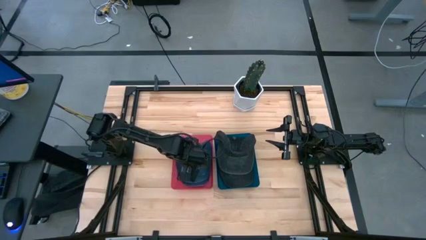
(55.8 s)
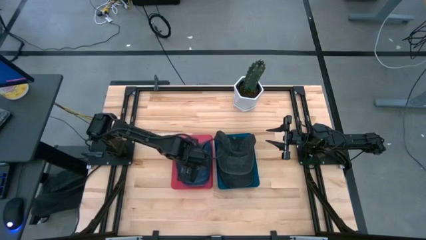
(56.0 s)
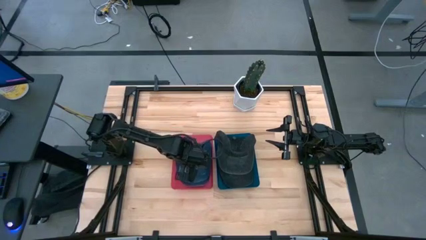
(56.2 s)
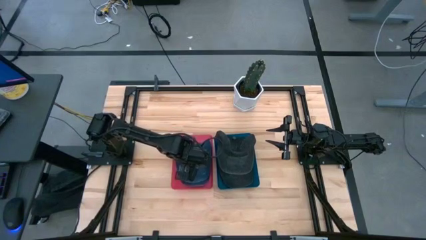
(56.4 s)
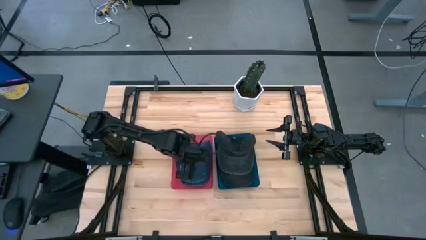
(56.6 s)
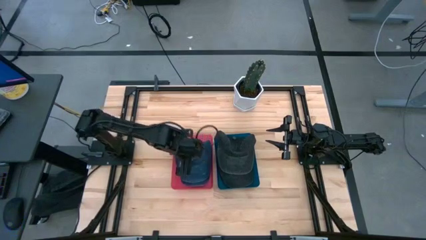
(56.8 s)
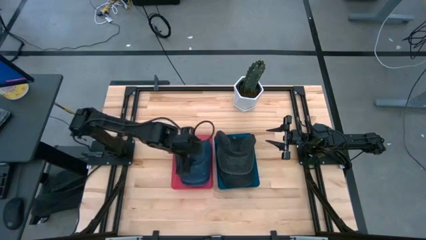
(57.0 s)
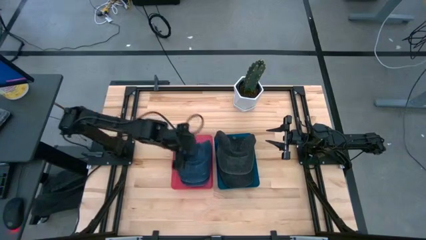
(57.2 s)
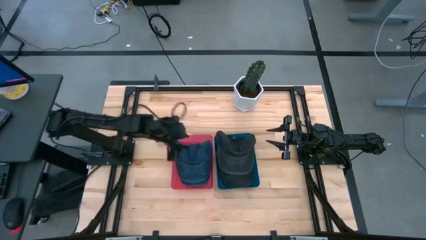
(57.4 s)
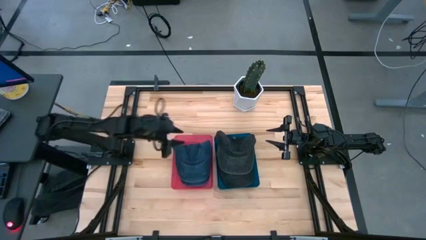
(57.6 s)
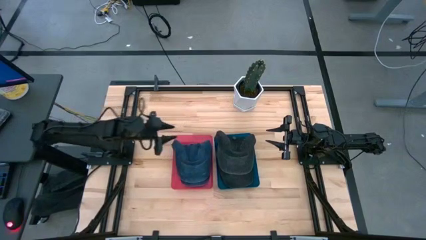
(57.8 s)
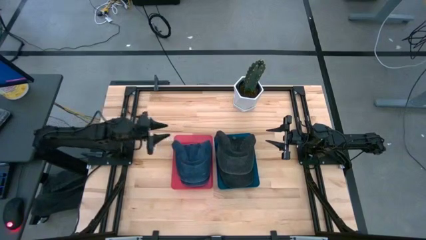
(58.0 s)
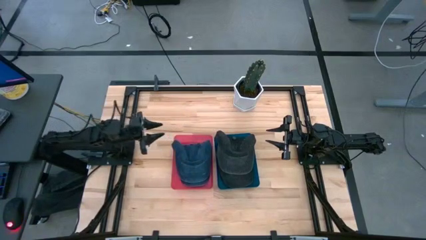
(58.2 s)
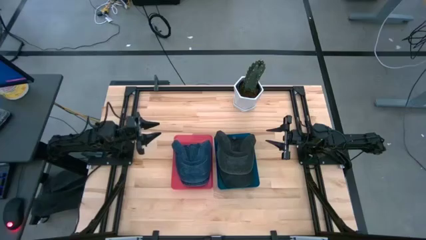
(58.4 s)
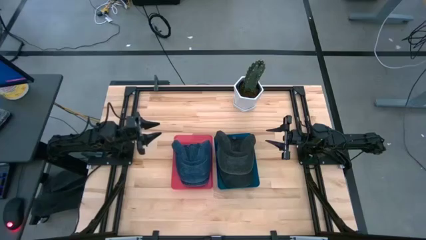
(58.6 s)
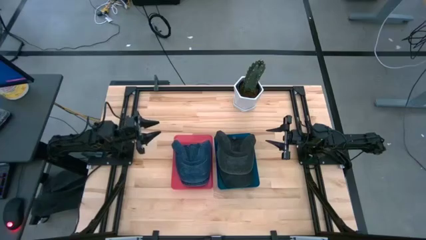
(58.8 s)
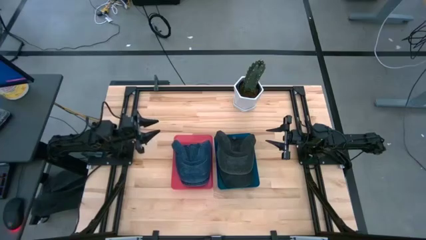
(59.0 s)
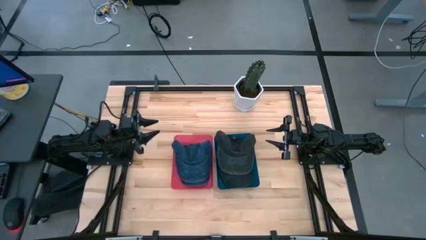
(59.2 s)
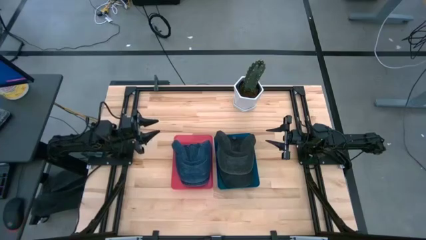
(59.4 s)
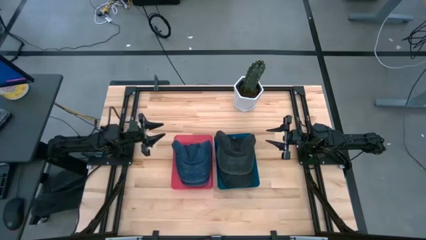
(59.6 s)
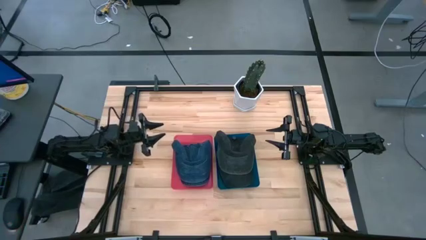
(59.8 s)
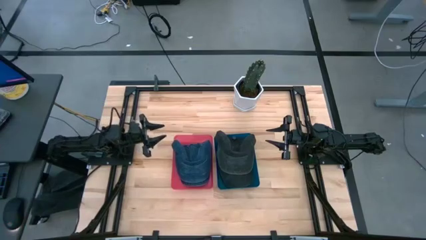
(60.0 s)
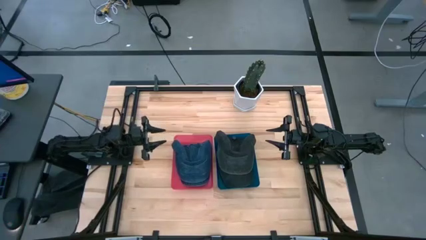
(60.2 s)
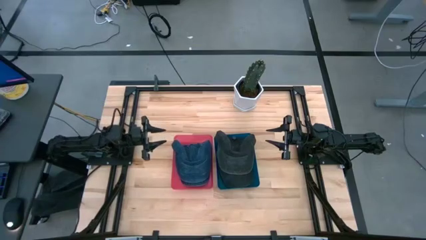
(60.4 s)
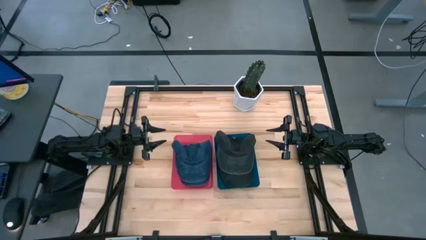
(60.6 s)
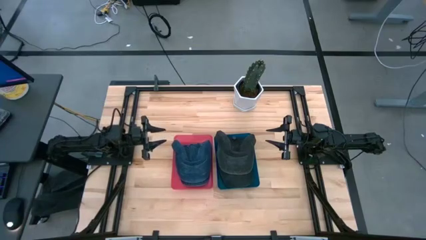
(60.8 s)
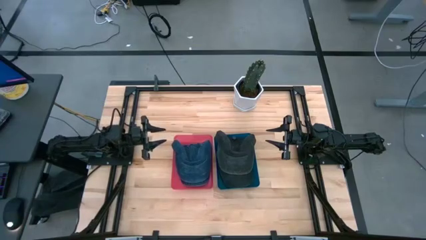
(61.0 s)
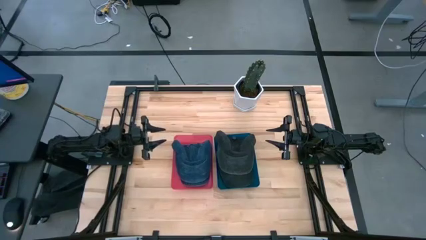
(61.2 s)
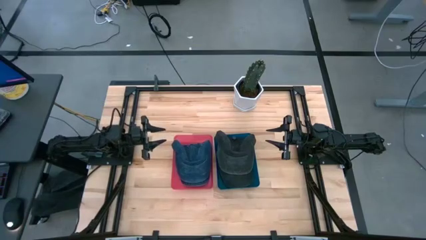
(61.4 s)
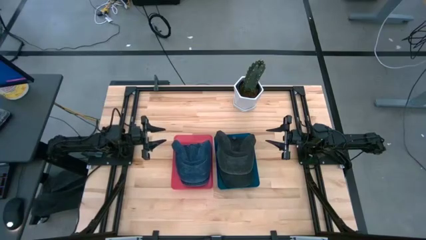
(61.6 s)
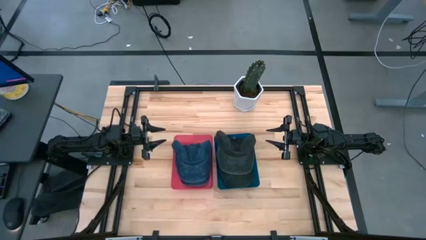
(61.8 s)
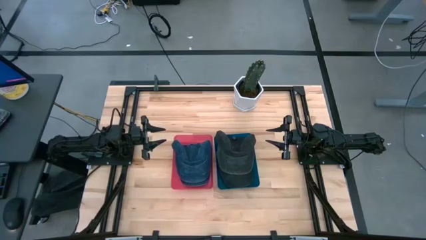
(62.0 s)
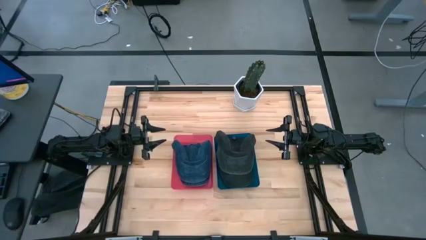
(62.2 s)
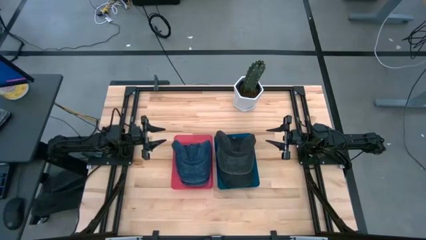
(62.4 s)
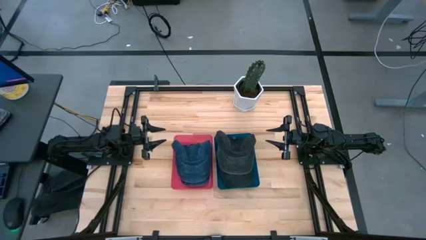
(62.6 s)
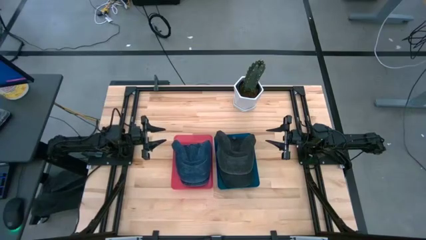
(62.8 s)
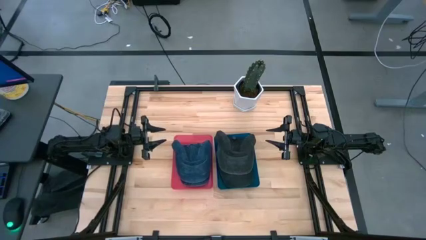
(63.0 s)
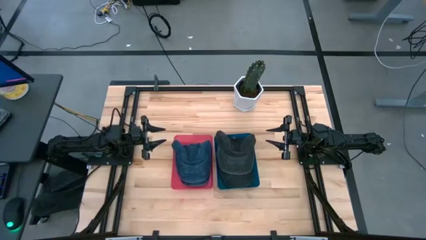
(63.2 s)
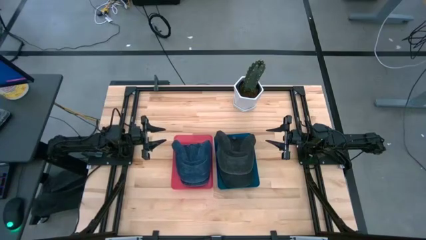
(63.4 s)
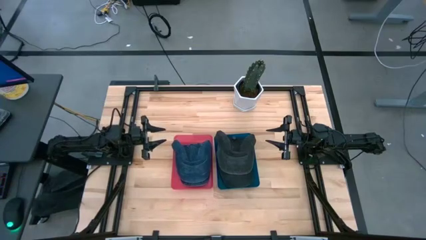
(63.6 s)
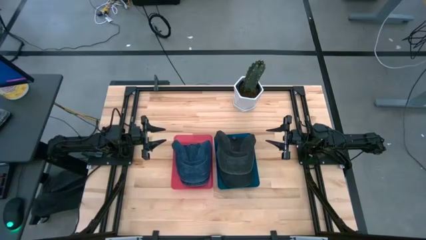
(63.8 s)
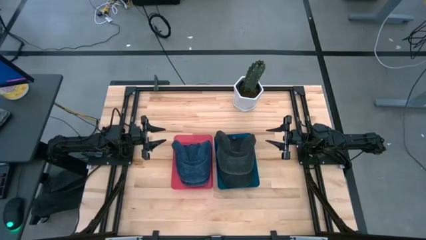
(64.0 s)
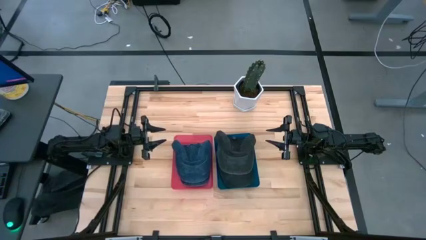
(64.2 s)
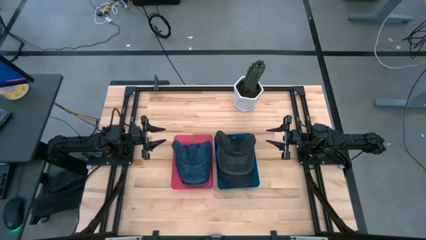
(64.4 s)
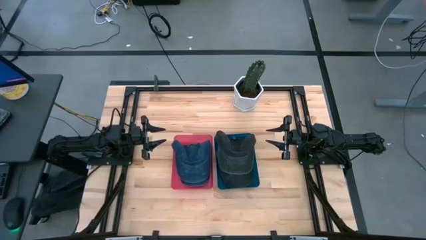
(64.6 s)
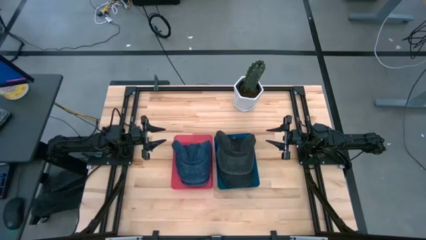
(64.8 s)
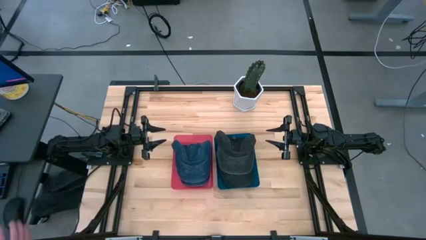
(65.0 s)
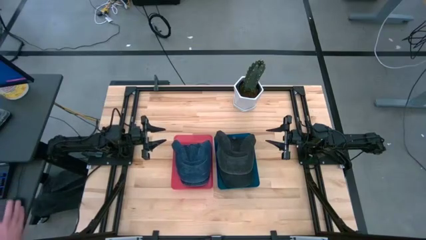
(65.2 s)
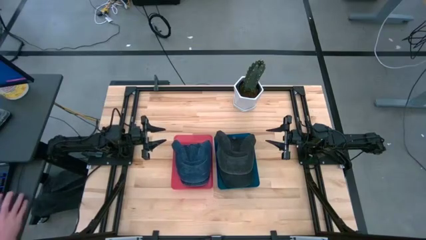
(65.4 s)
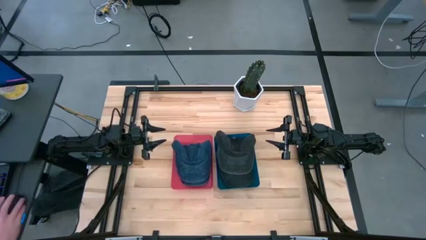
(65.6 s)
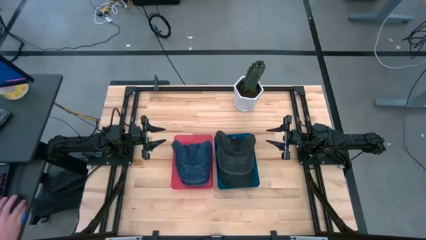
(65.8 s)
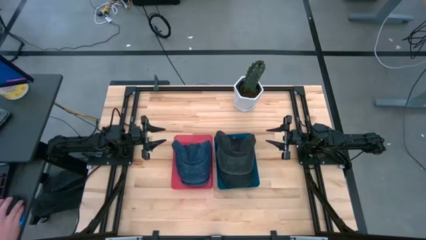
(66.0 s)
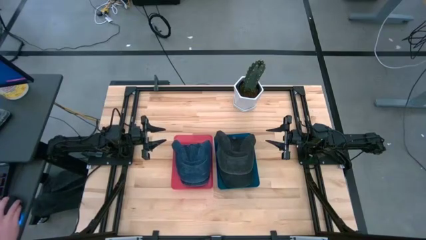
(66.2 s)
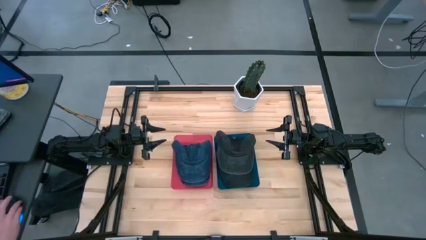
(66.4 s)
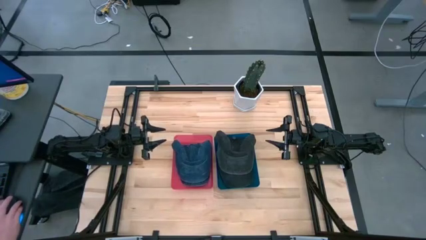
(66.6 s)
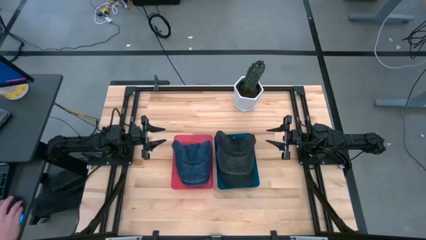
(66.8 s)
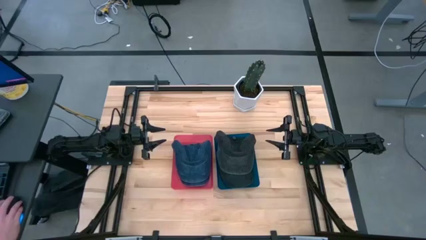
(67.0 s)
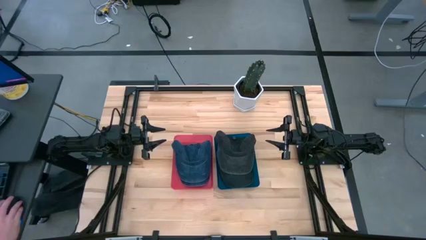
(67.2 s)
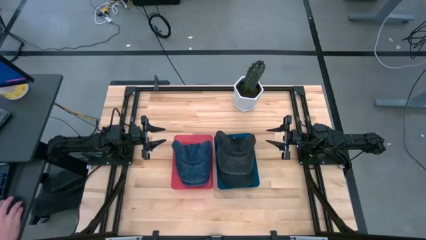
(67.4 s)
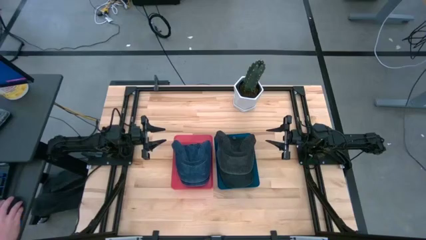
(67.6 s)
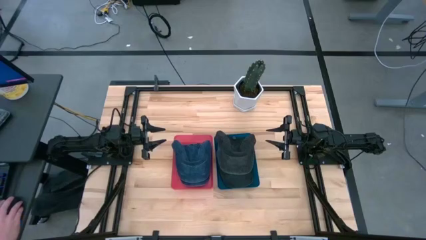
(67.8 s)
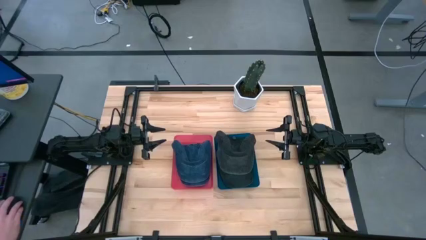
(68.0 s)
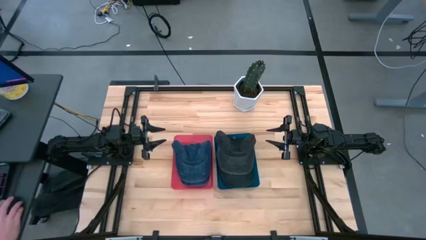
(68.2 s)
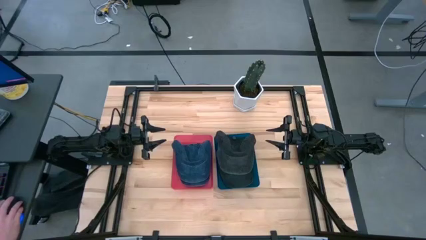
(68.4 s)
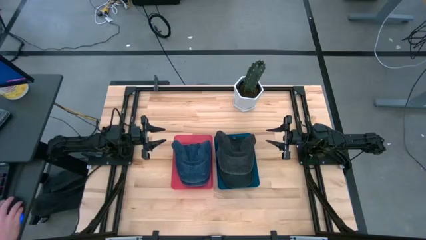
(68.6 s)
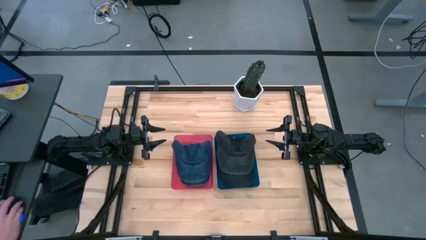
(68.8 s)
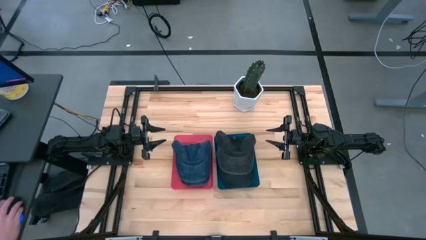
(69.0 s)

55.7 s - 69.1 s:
Task: Pick & Place hat
Return to Home Position

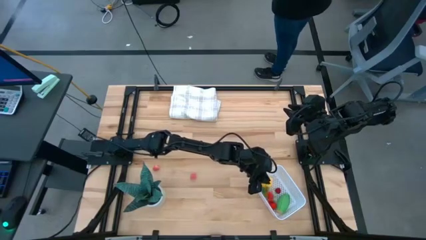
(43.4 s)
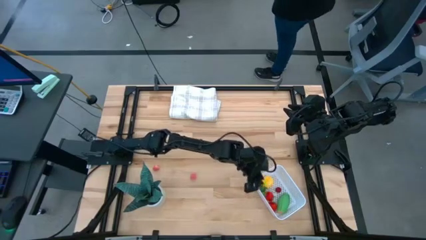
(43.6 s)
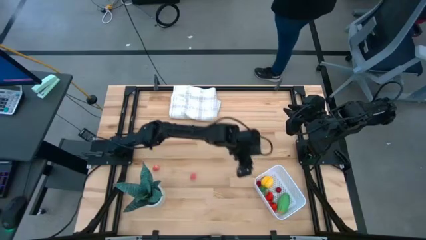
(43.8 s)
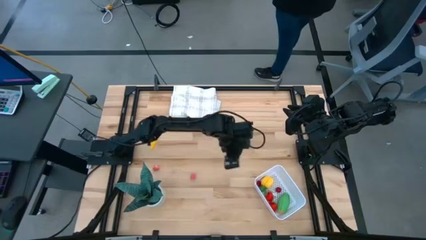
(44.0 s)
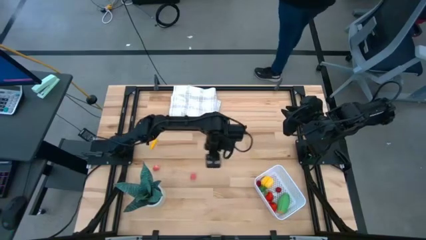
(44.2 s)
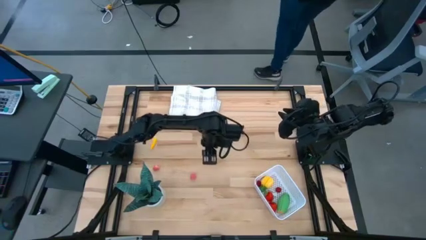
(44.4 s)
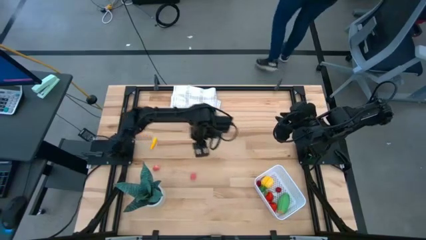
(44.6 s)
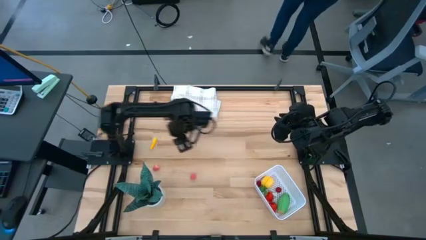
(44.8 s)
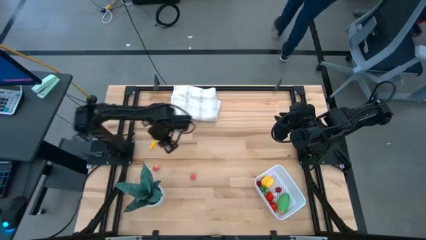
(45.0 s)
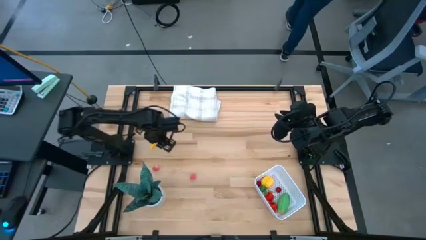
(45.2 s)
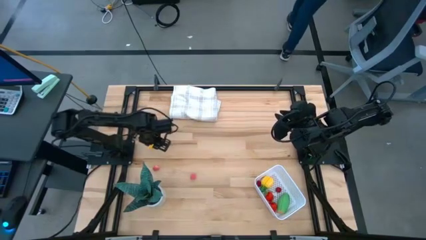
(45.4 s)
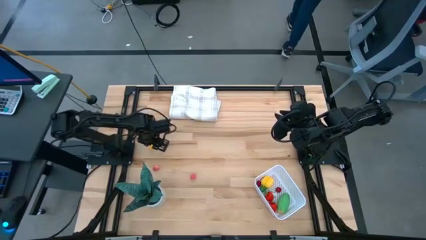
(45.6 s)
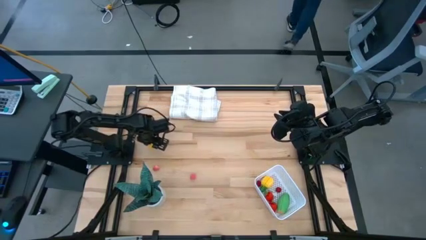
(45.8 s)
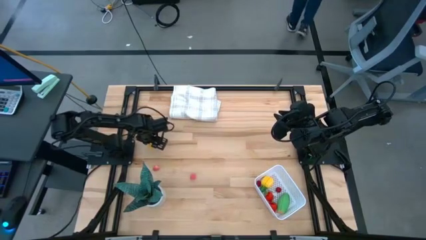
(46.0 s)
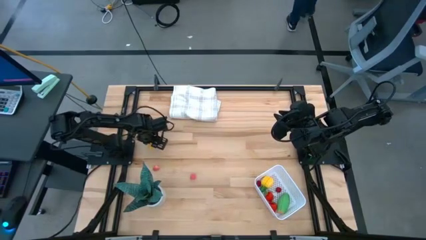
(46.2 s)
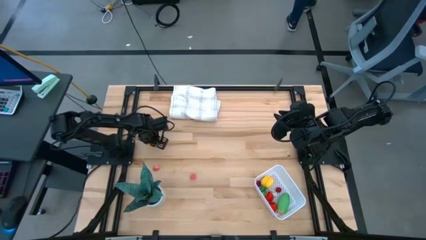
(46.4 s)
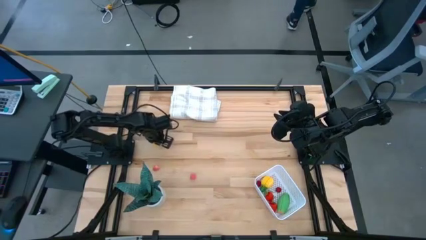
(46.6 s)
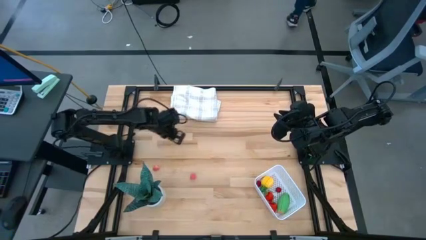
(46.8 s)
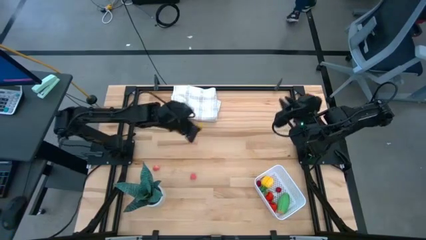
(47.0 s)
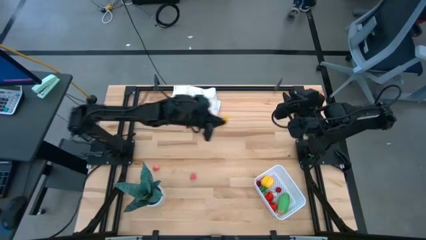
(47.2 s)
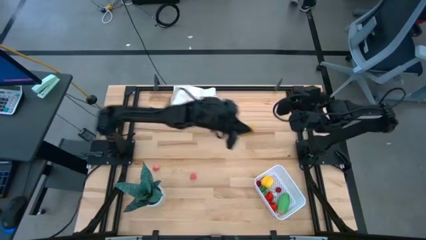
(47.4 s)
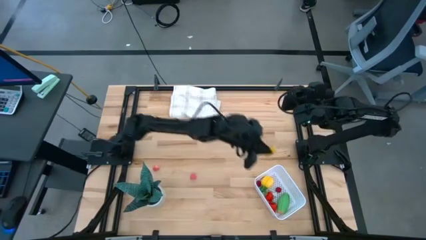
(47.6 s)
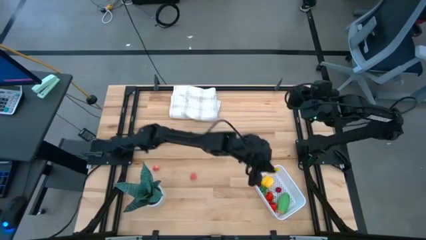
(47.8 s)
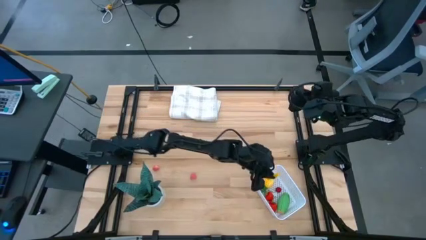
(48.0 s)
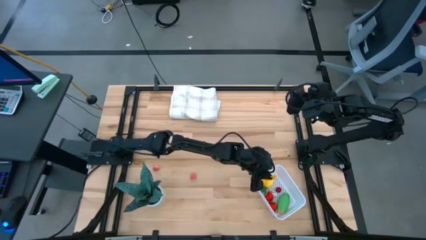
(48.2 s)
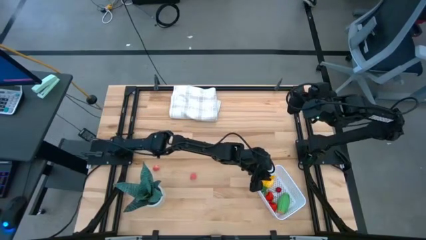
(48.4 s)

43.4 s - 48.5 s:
Task: Pick and placing Produce into tupperware
Put the yellow corn into the white bin
